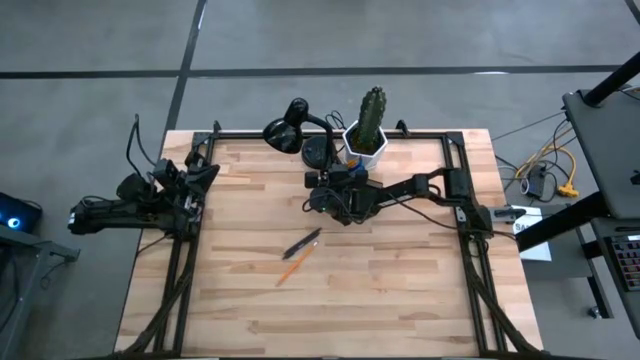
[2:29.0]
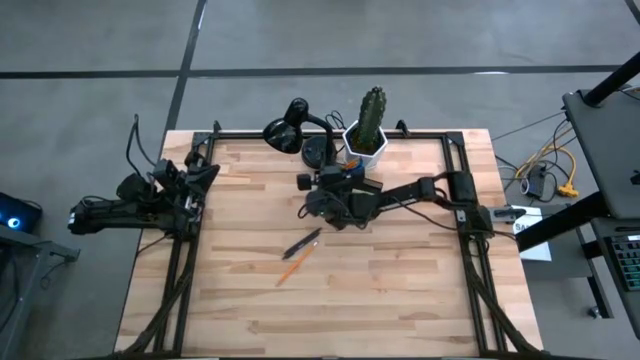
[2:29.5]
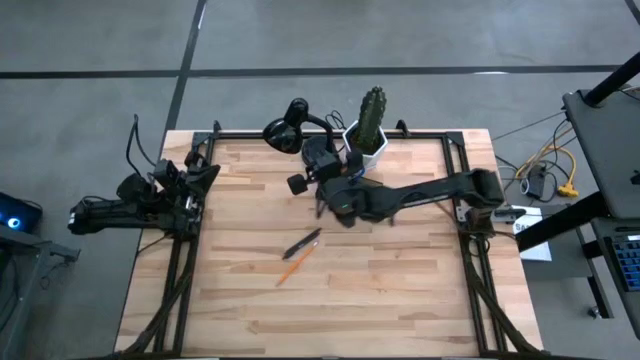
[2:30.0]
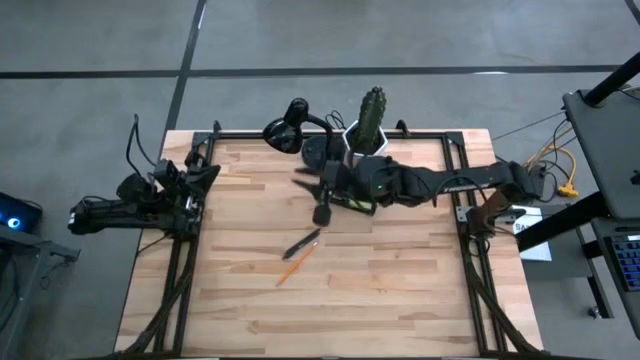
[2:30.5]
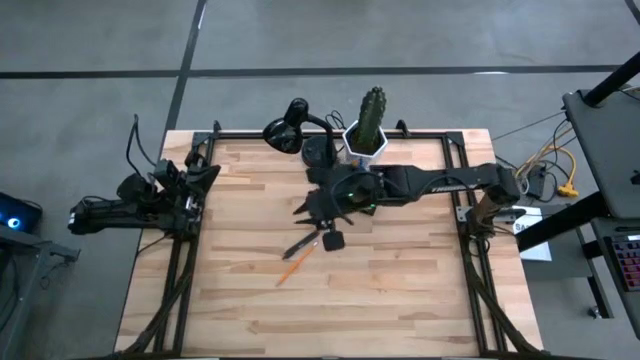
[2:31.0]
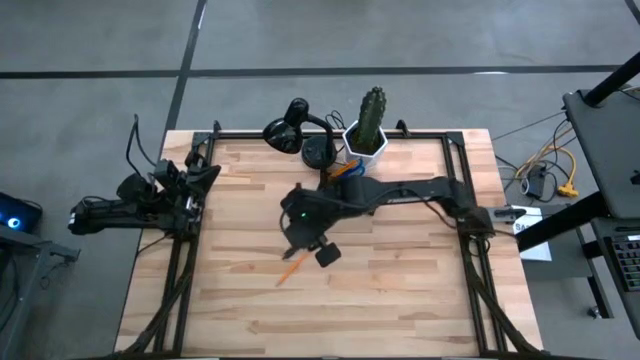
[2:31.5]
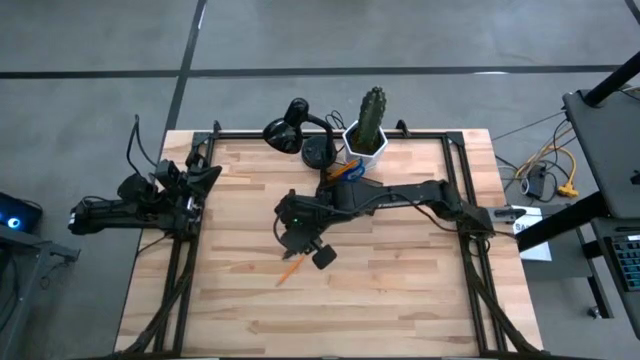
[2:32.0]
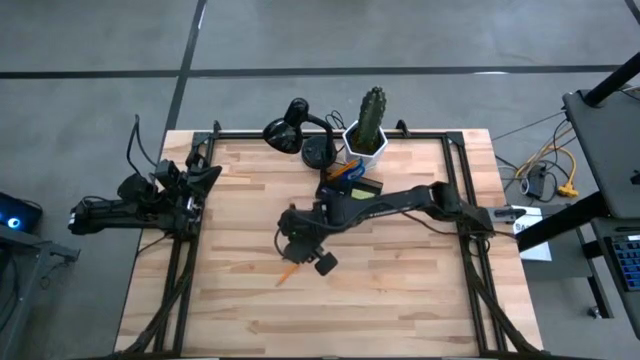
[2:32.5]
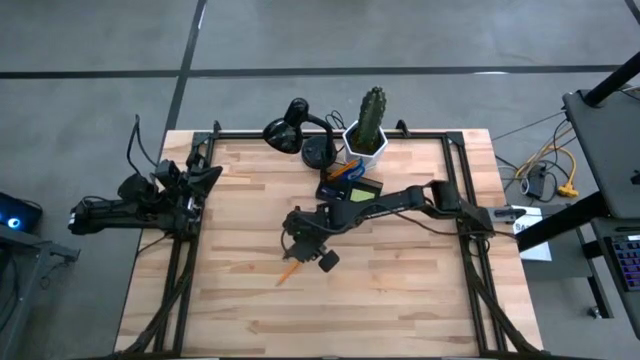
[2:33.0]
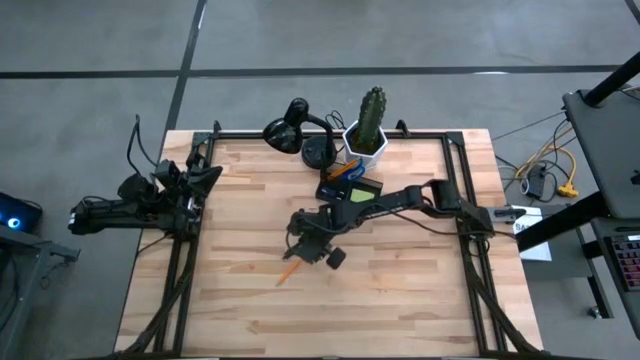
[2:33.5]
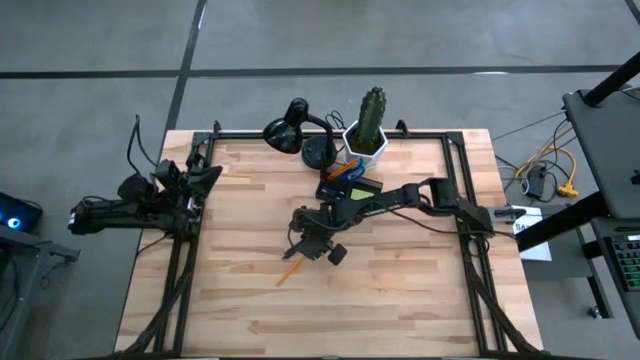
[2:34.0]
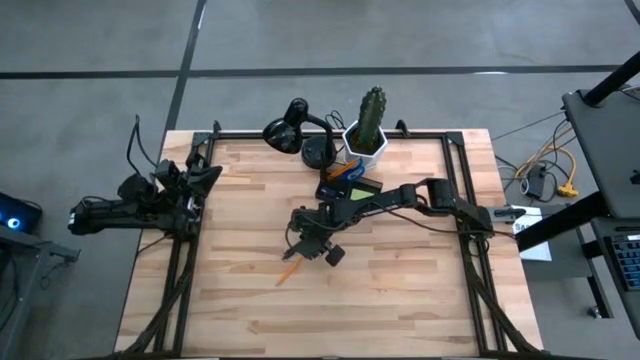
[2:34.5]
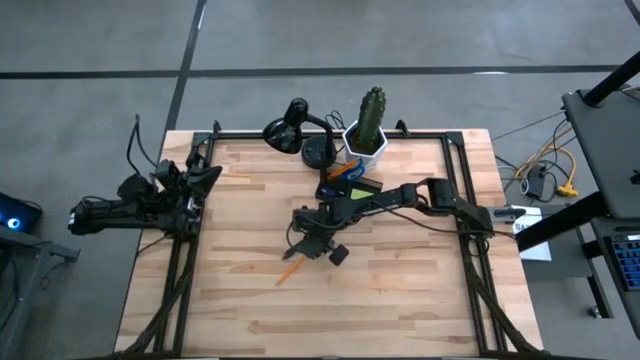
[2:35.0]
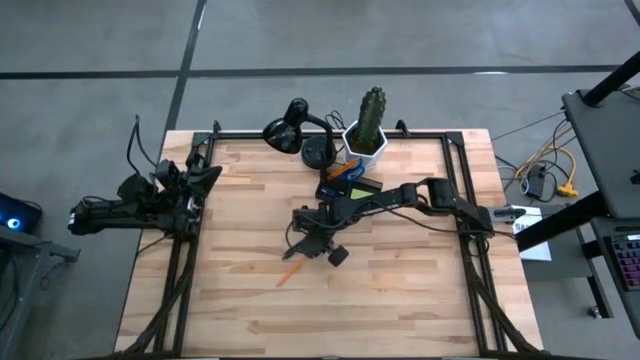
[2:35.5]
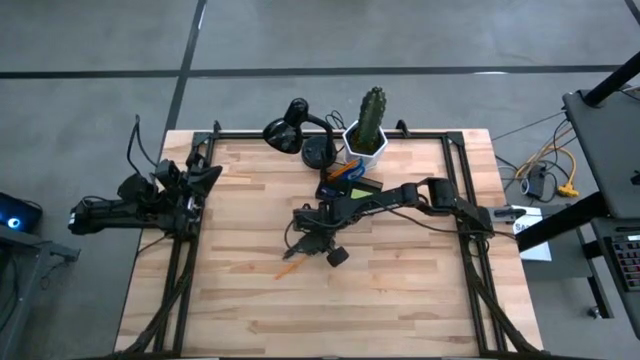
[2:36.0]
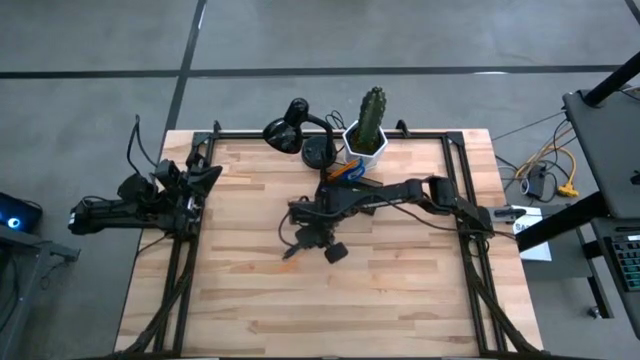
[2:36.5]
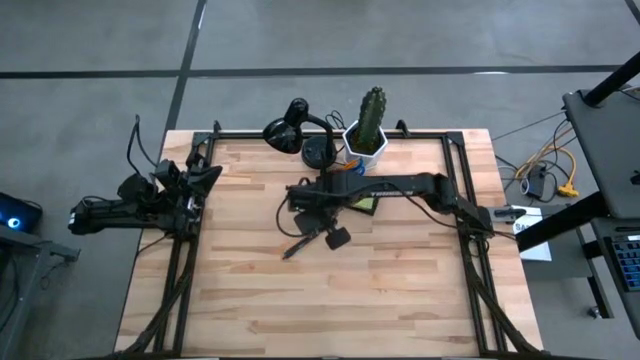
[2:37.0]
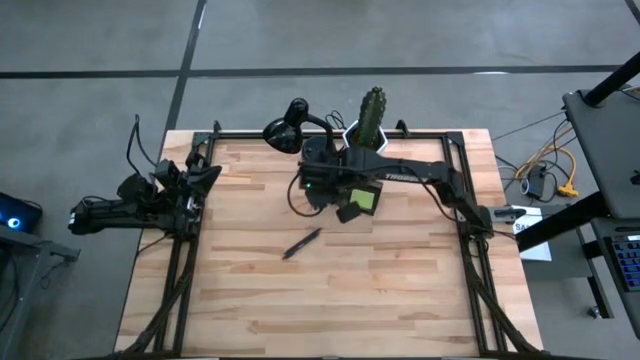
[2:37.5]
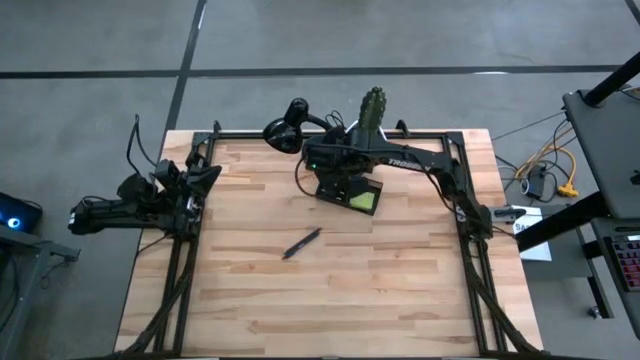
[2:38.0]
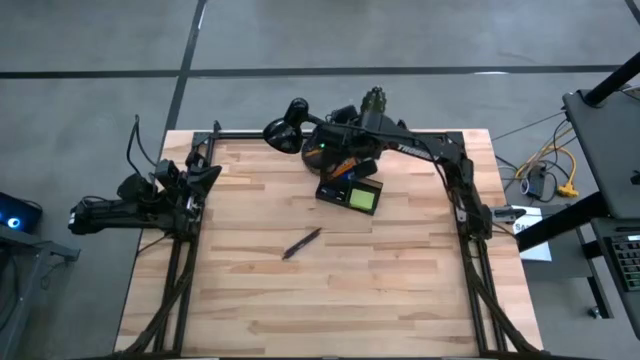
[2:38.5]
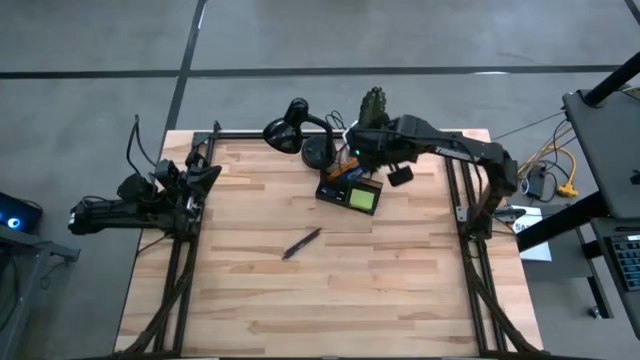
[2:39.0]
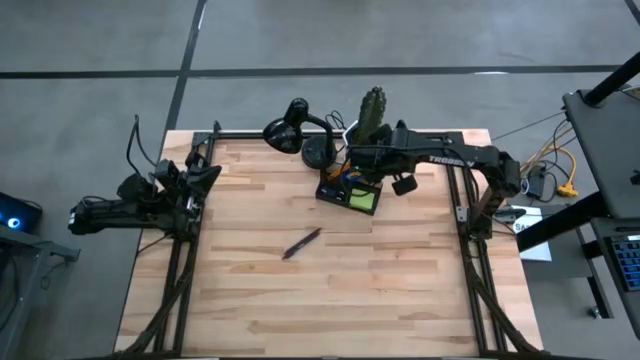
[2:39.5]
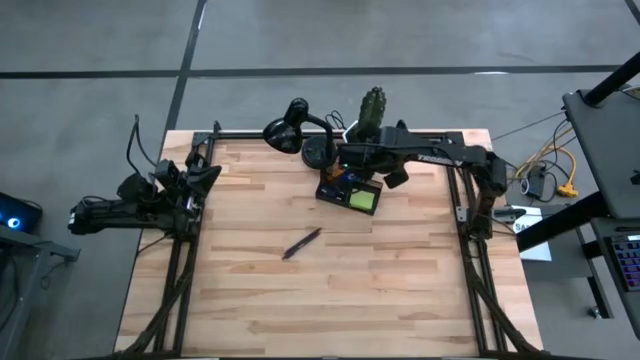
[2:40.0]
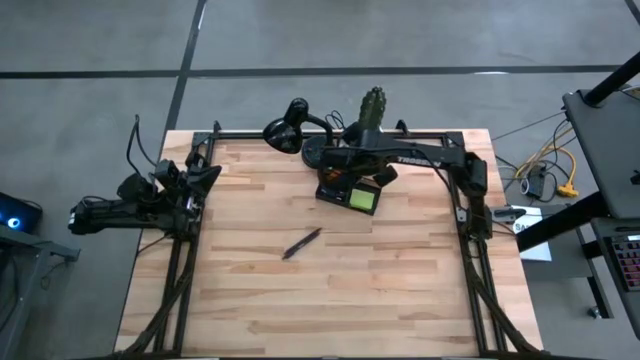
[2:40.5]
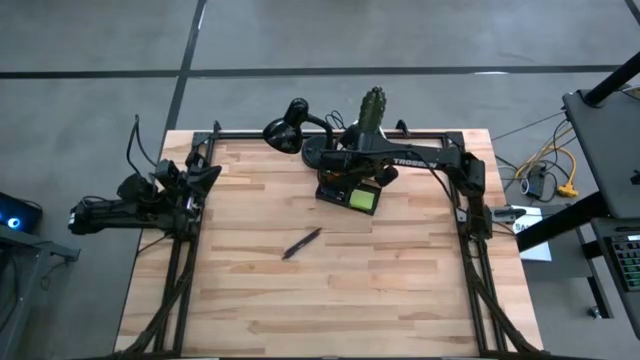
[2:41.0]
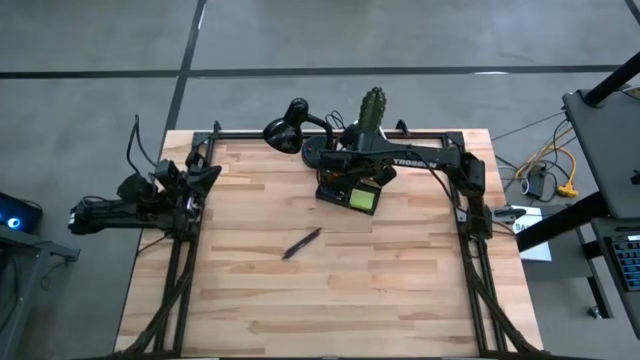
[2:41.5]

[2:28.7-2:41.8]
Task: Pick and place office supplies into organizer
Put the orange pencil into the black desk organizer

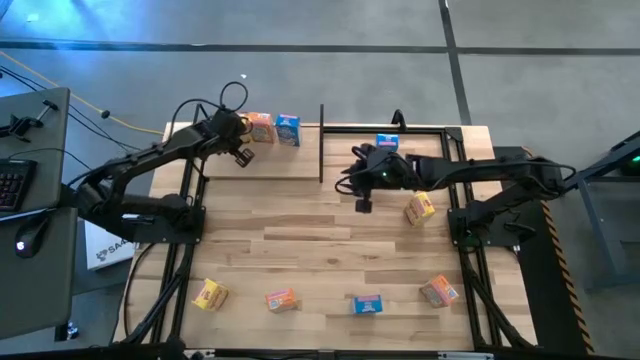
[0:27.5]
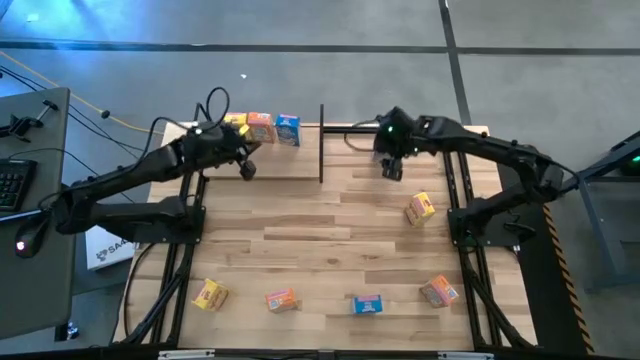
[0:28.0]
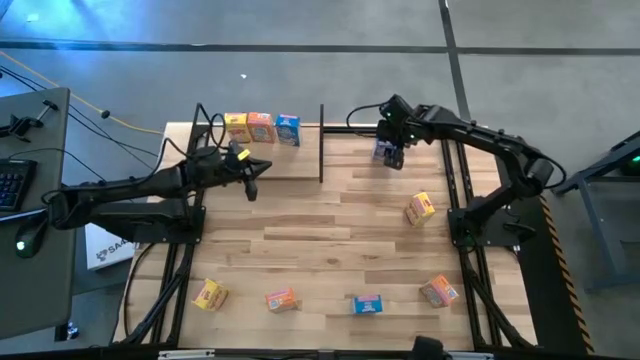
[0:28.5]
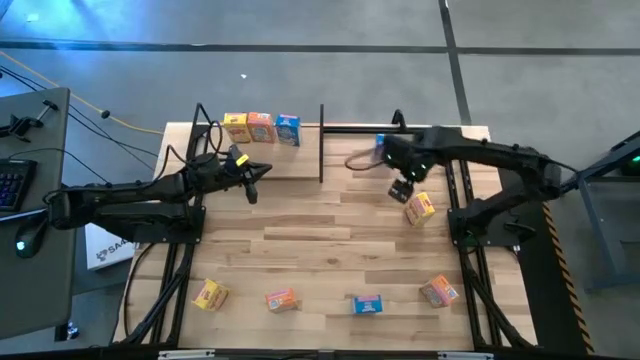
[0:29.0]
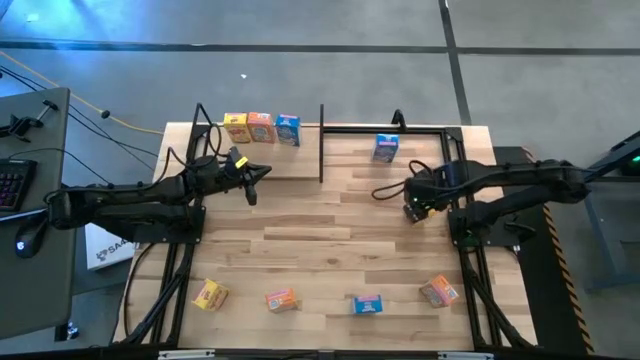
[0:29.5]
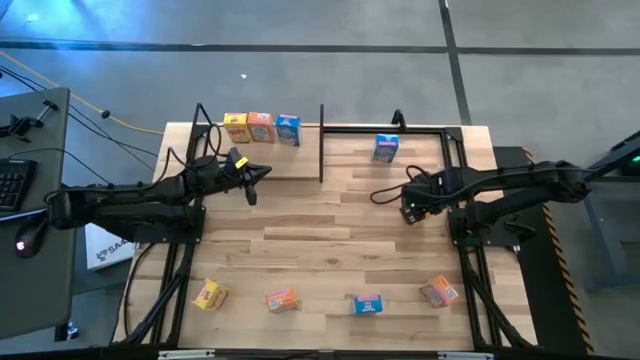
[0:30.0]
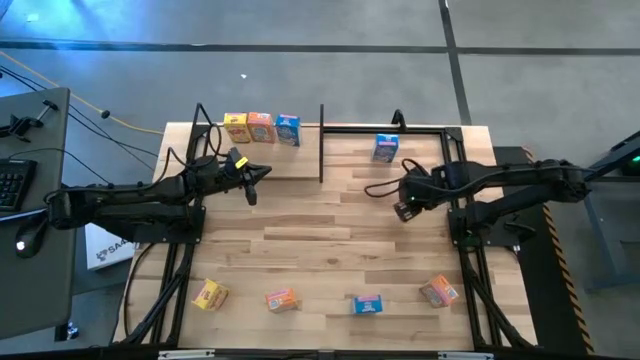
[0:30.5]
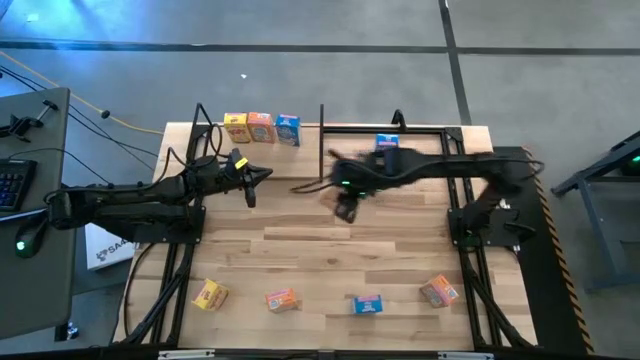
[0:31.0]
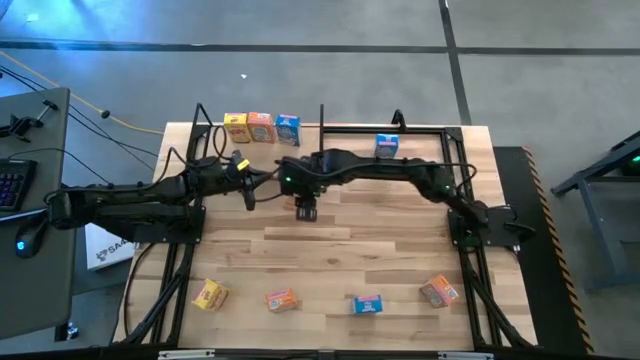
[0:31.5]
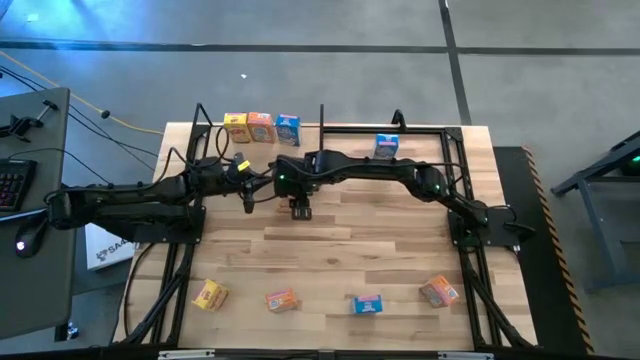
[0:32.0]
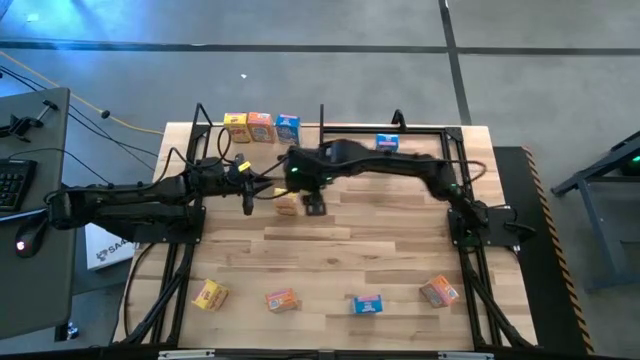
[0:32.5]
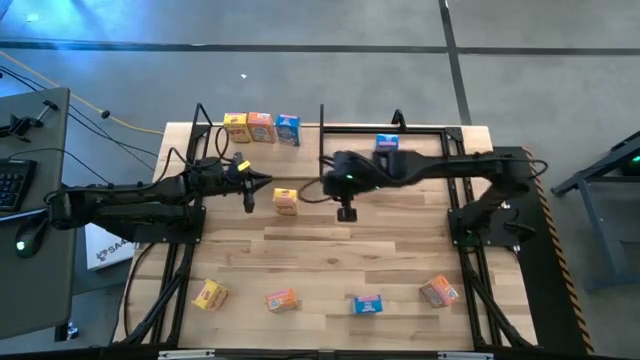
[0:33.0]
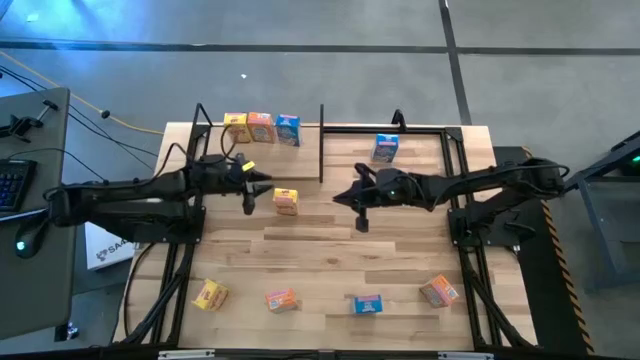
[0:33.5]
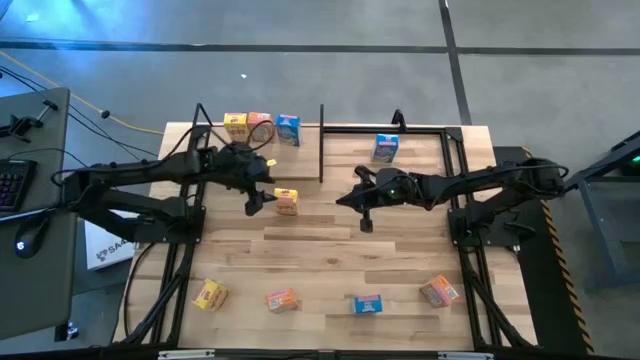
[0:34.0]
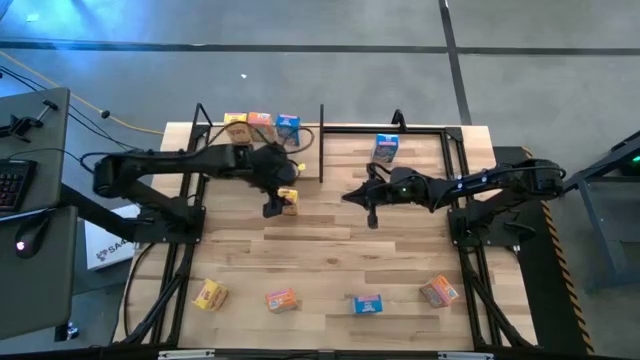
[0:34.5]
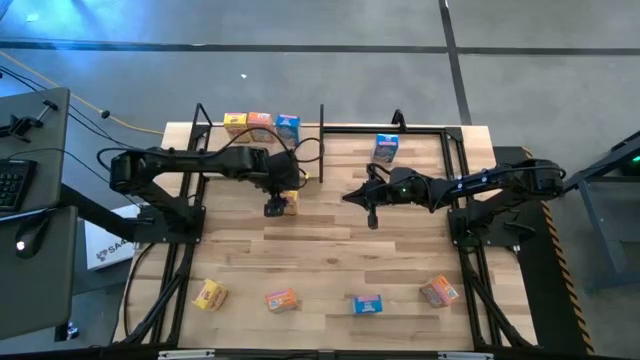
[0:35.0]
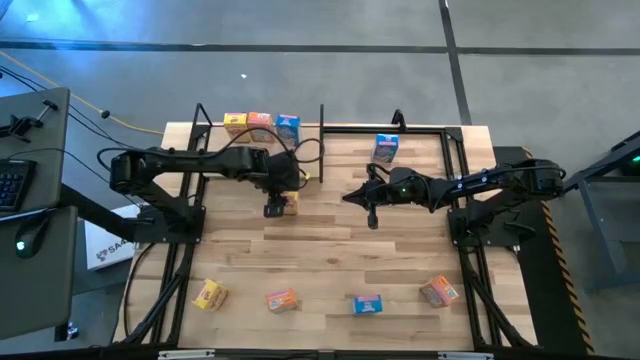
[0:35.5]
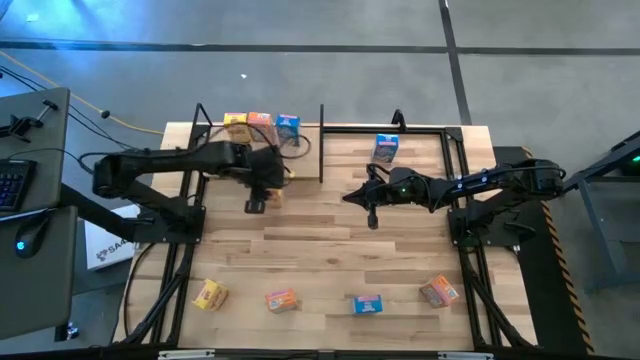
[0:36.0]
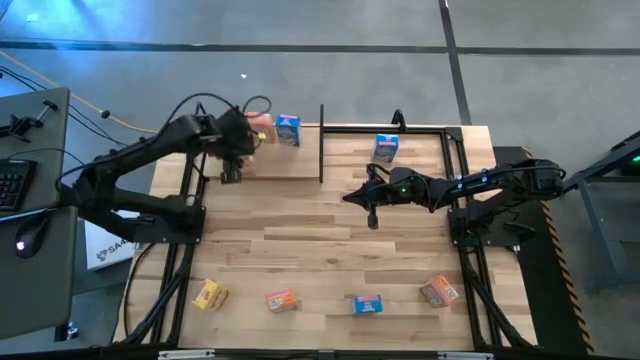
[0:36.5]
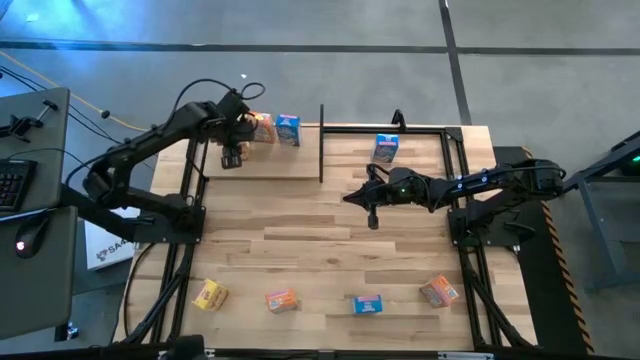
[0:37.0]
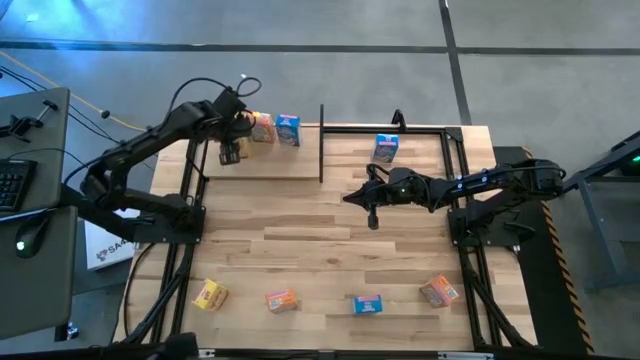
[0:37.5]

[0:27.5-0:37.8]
Task: Stack cereal on shelf
Put the top yellow cereal box on the shelf aligned with the other yellow cereal box
